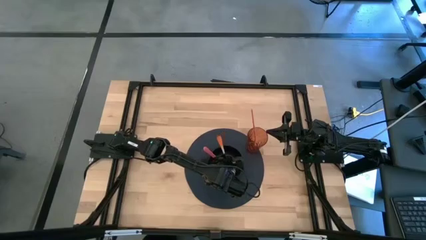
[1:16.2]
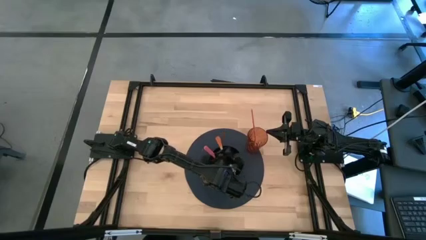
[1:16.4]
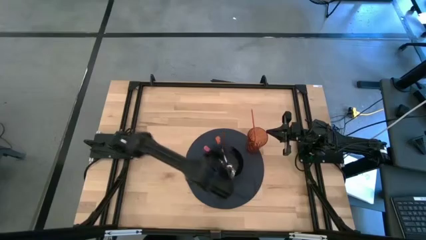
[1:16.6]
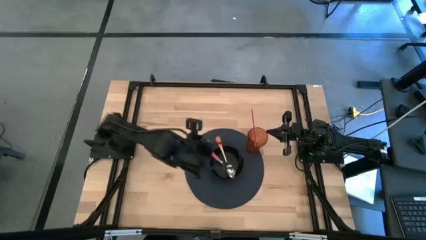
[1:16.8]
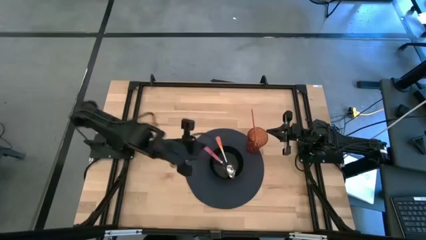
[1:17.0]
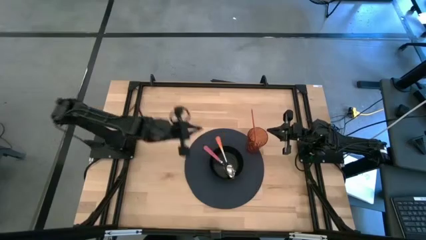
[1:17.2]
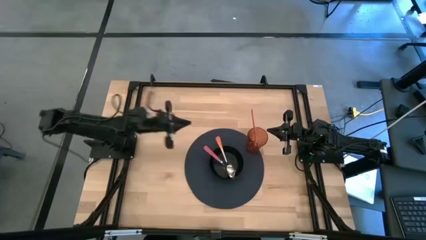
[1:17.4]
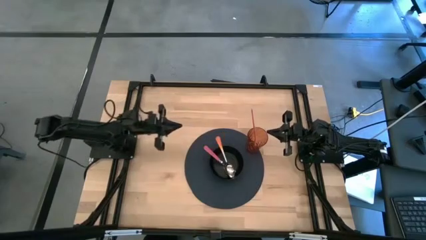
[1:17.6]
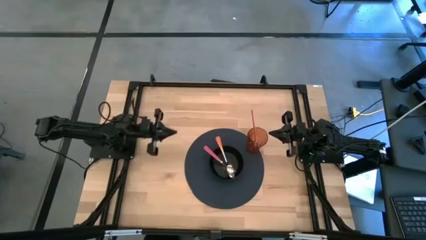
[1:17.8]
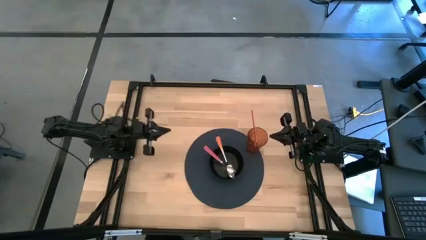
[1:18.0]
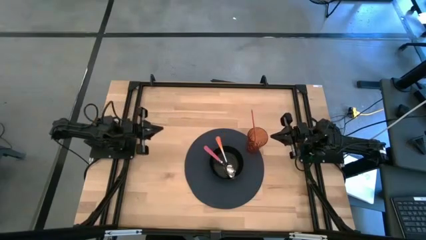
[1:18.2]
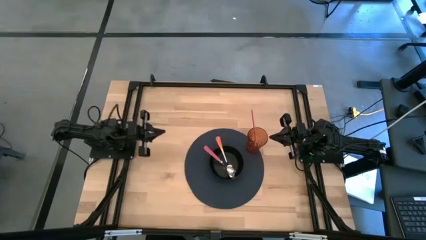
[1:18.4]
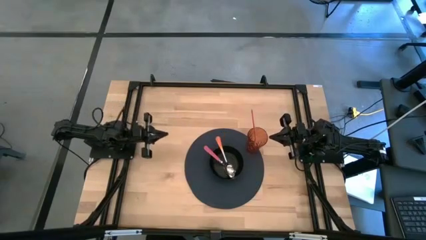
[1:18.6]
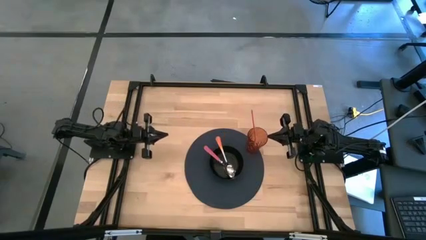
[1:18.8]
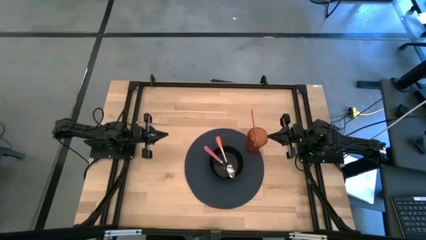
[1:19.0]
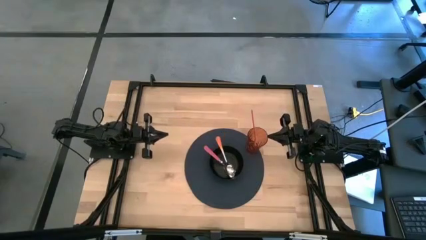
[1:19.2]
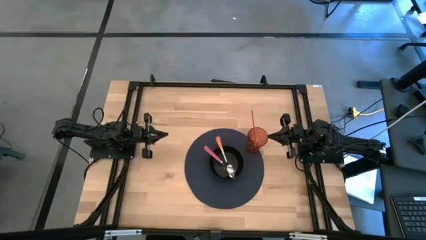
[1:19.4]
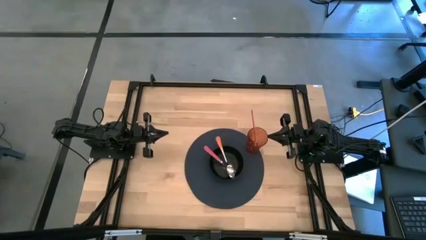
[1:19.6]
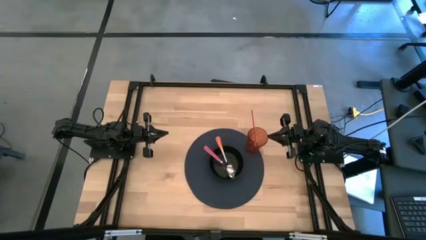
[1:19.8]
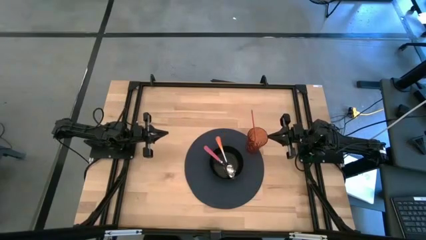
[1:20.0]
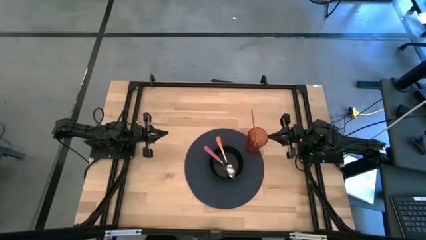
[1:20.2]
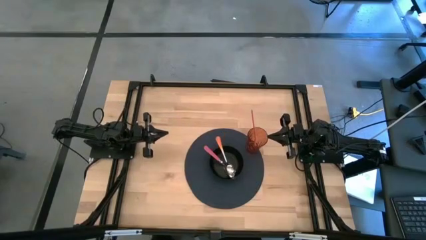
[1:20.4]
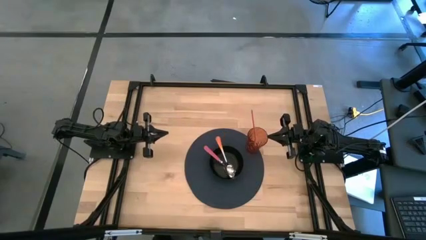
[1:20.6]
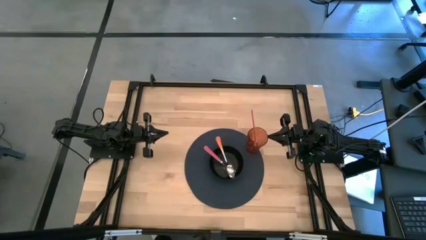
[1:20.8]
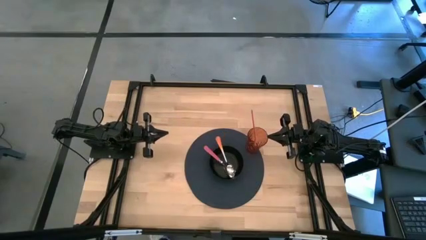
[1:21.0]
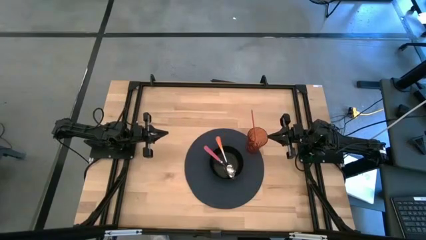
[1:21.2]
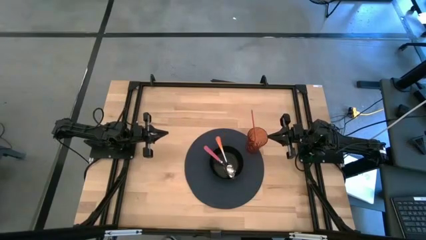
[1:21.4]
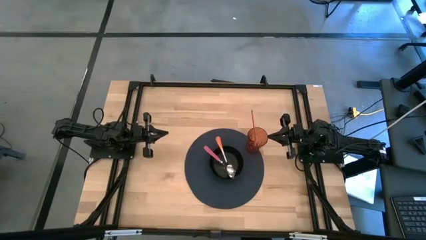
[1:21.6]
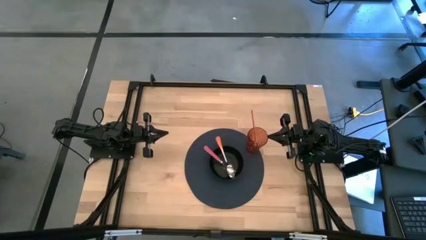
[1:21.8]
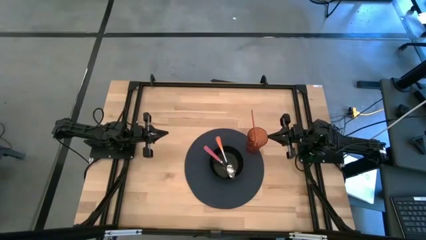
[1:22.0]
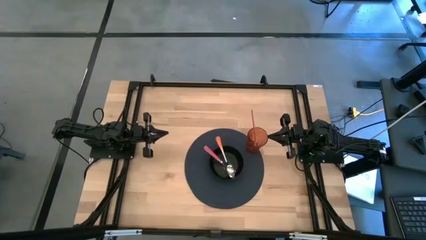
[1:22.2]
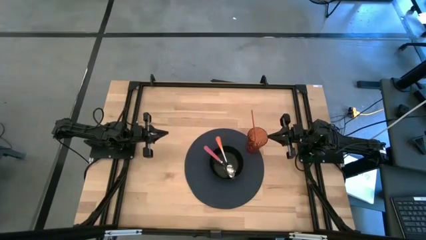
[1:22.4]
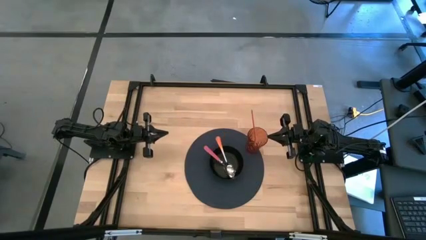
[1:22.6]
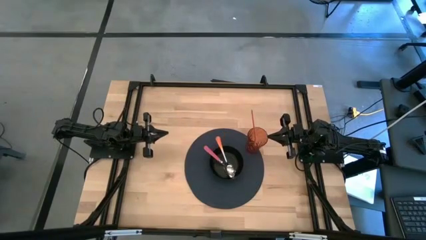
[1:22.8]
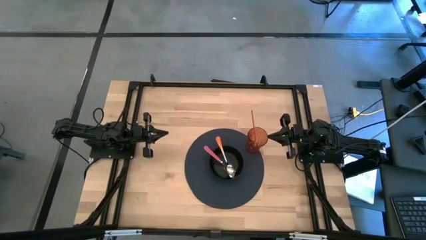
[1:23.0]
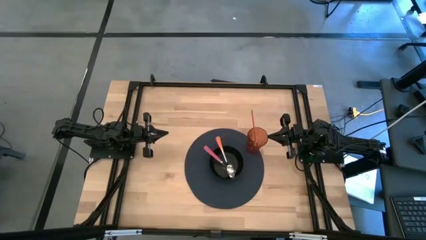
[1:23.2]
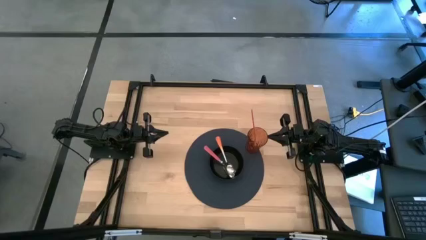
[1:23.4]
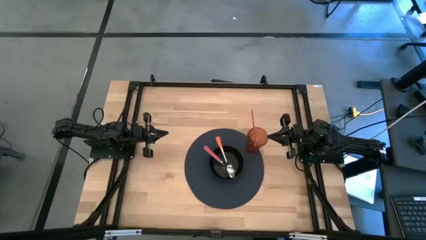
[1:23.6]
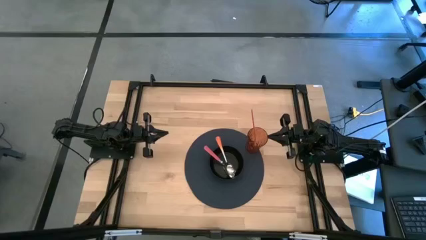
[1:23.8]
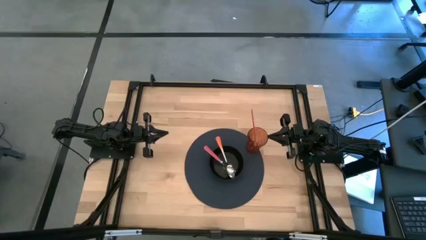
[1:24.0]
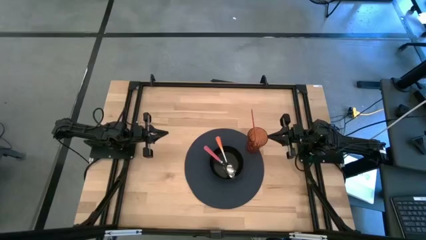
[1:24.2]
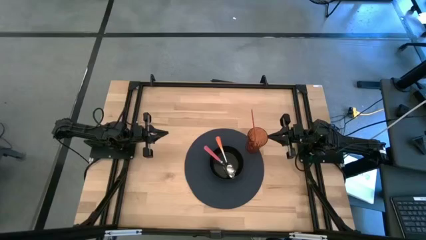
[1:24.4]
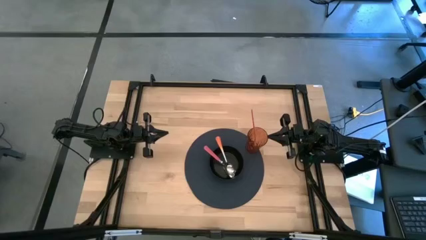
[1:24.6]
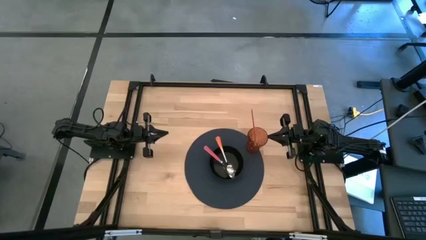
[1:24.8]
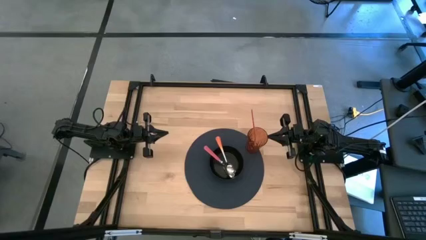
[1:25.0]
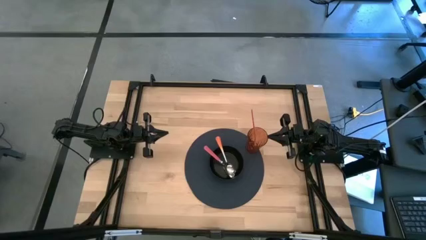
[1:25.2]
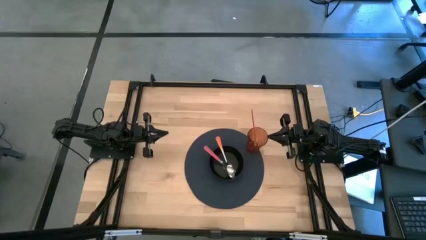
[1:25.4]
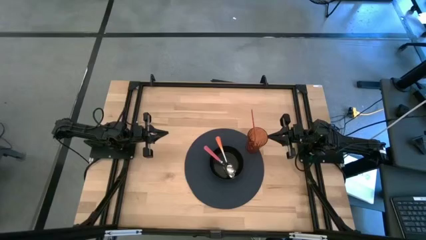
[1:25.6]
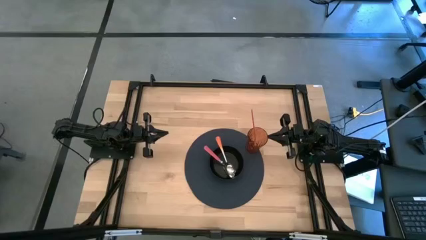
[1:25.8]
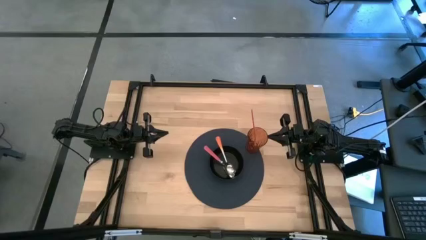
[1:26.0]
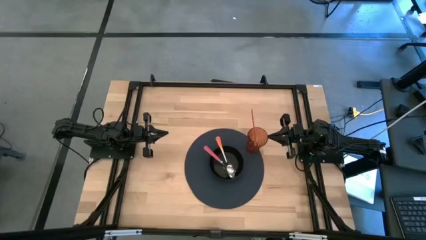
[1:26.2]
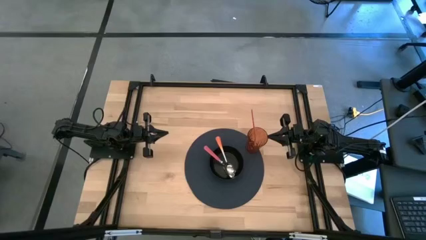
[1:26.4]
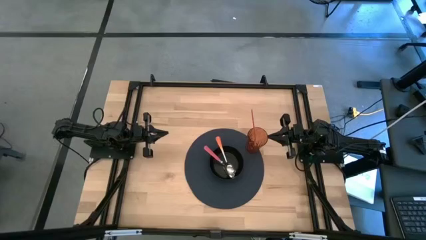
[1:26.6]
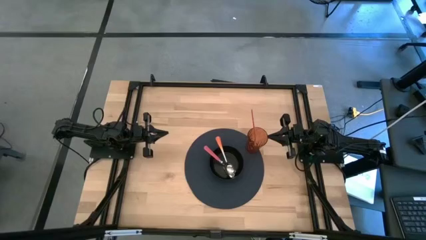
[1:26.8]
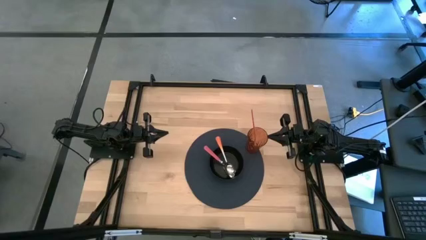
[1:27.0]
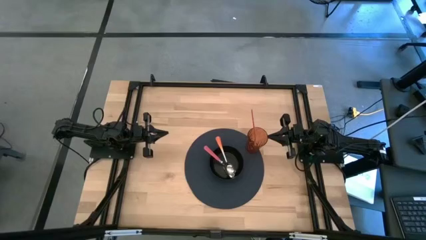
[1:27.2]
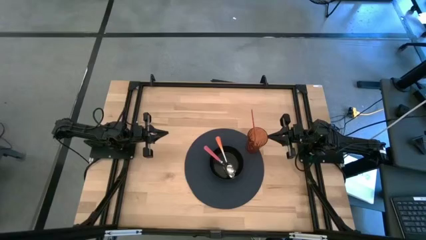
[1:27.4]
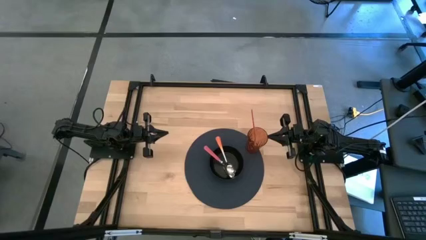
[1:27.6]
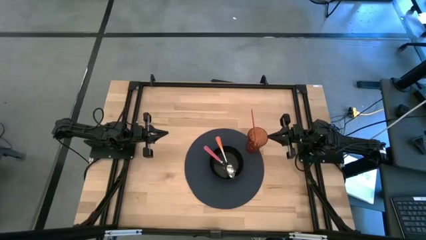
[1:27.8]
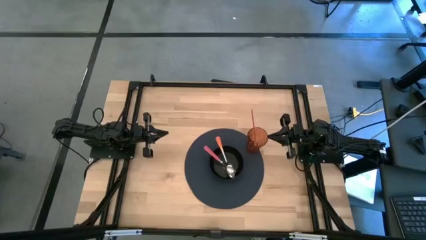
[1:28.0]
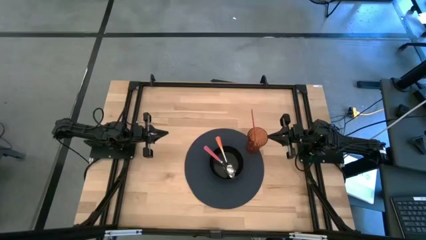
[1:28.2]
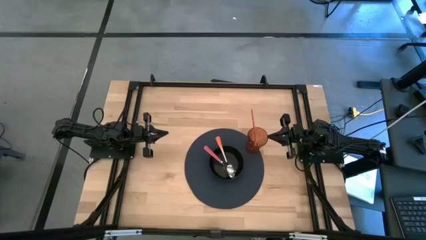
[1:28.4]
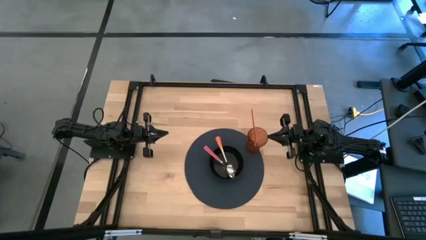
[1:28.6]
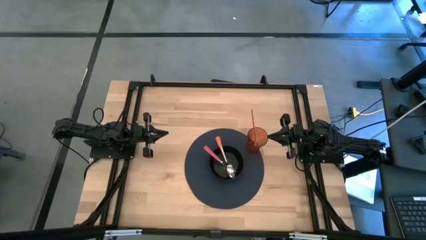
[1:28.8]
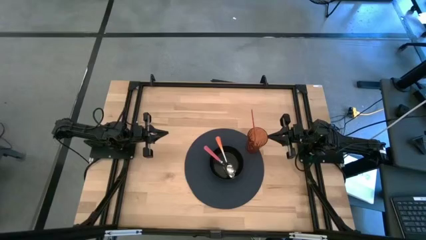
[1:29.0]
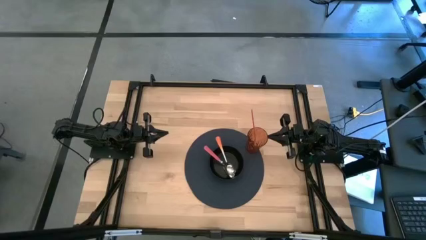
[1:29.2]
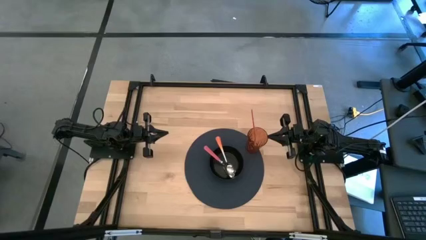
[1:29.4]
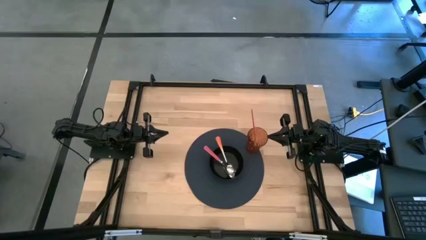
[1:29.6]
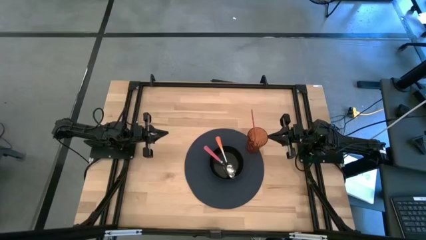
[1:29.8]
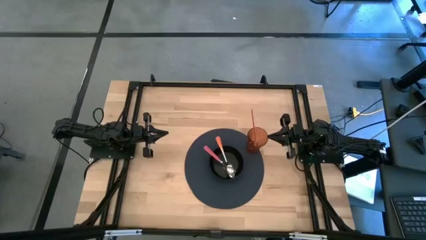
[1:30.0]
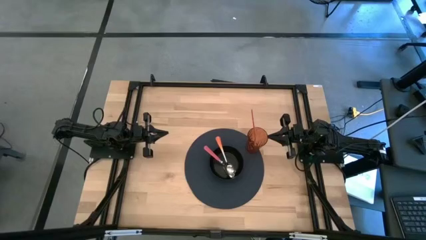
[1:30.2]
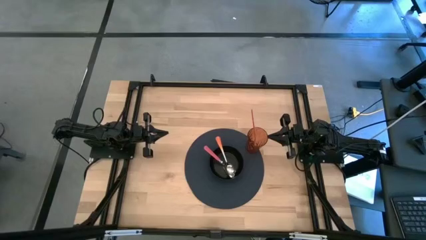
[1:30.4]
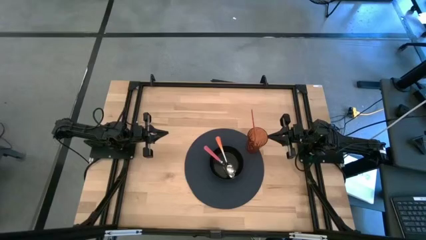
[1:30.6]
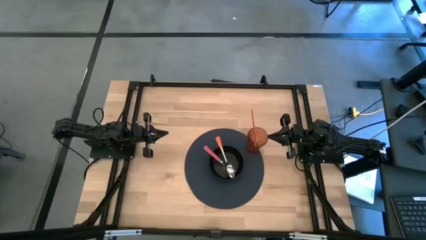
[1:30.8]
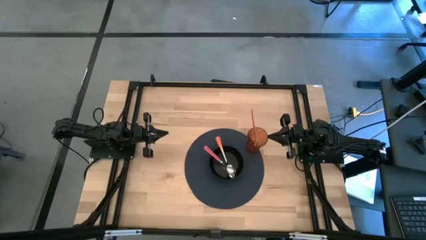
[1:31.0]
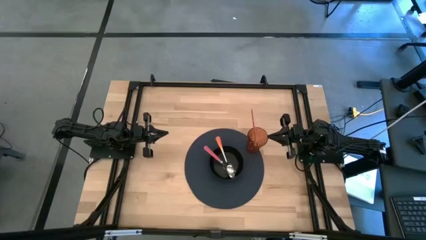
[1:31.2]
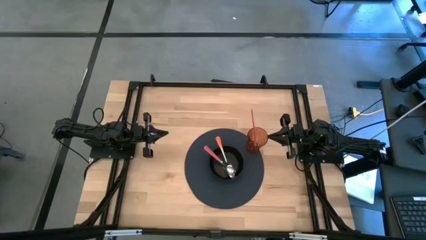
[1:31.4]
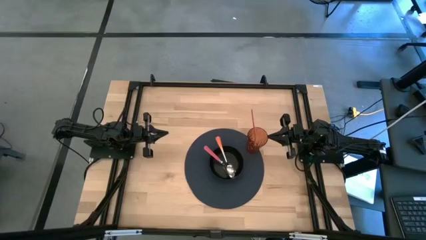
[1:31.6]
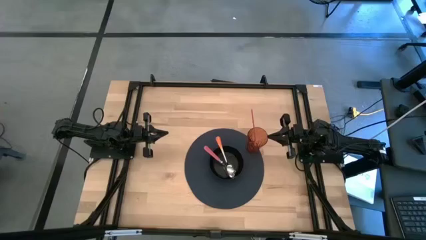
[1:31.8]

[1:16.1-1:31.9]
Task: Pick & Place Utensil
Return to Home Position
